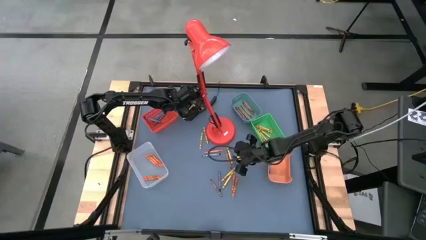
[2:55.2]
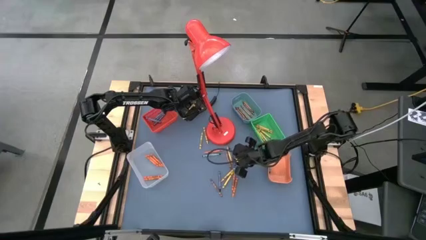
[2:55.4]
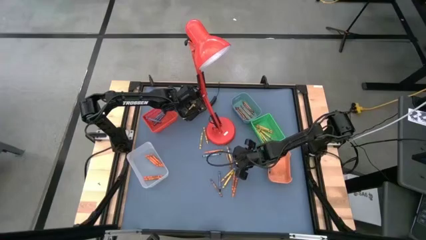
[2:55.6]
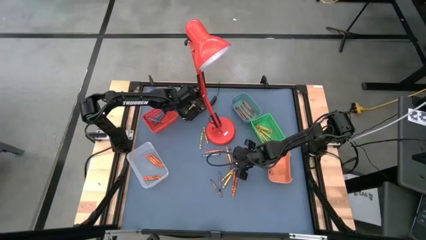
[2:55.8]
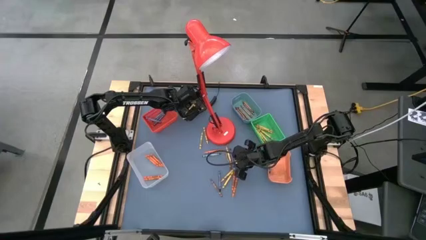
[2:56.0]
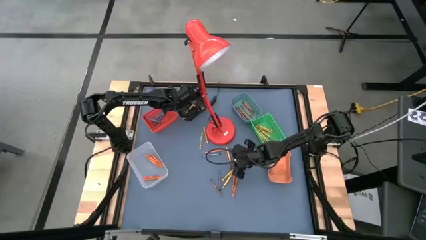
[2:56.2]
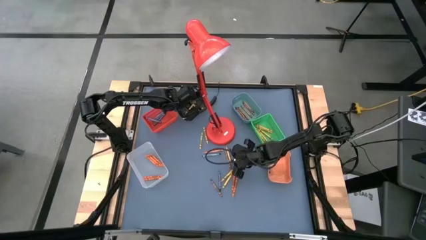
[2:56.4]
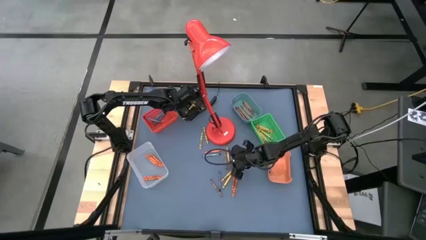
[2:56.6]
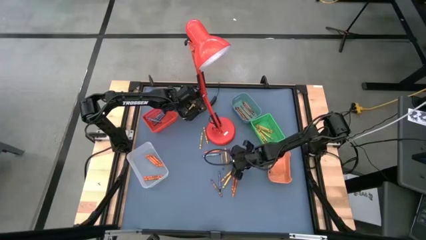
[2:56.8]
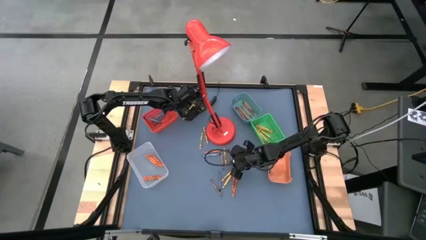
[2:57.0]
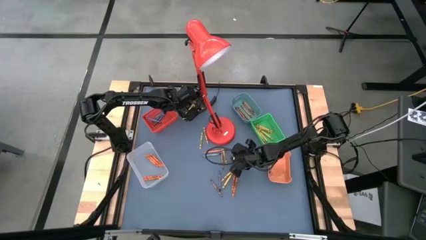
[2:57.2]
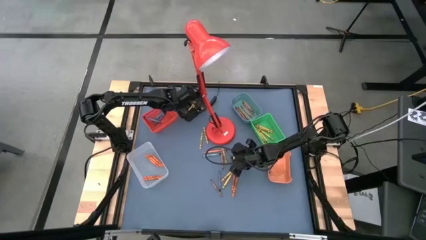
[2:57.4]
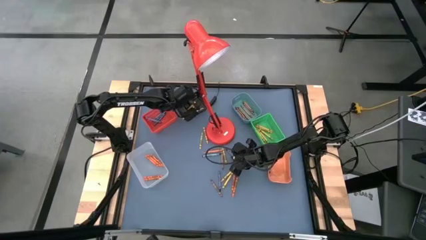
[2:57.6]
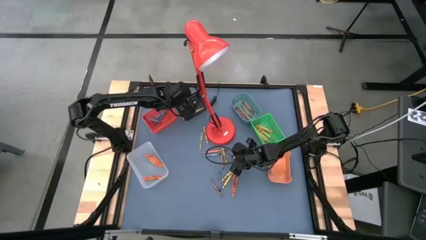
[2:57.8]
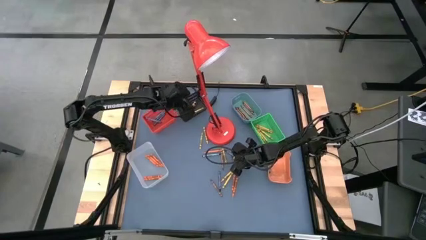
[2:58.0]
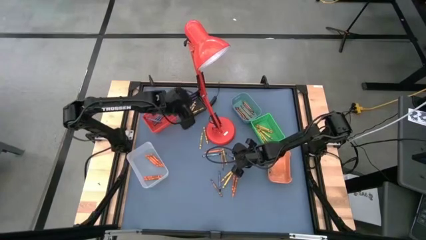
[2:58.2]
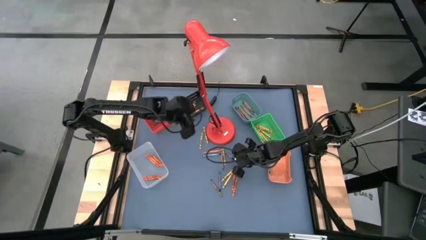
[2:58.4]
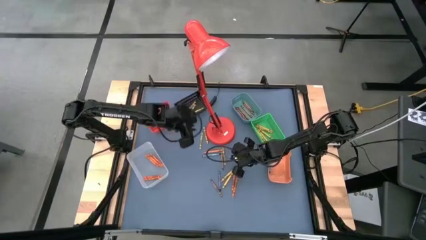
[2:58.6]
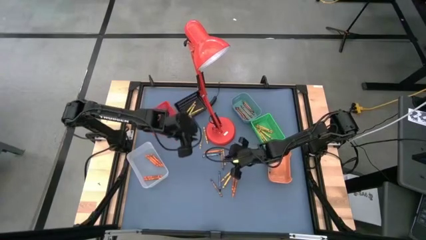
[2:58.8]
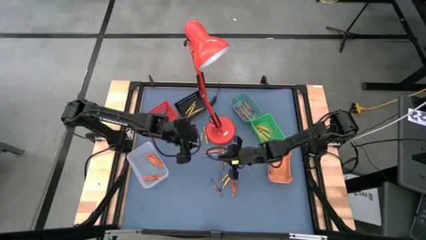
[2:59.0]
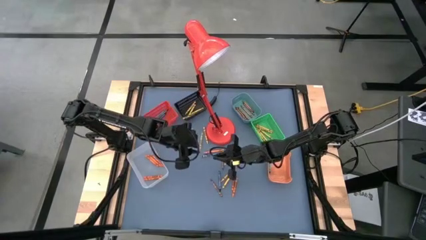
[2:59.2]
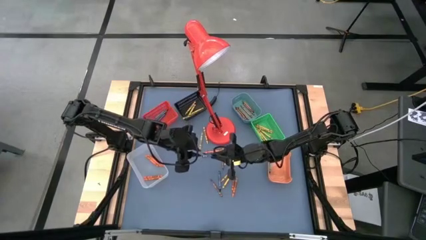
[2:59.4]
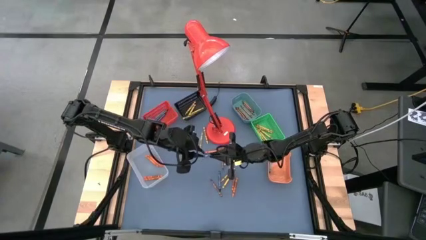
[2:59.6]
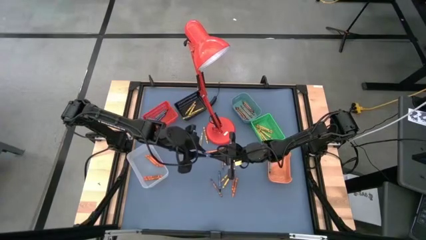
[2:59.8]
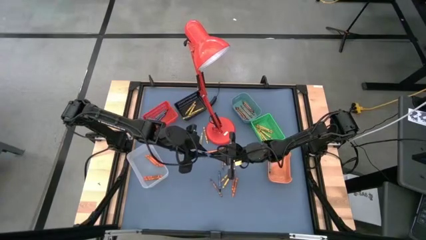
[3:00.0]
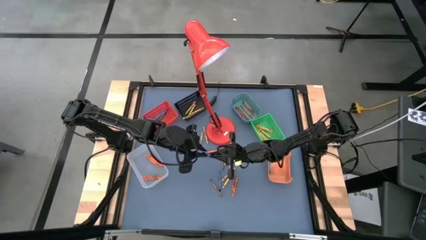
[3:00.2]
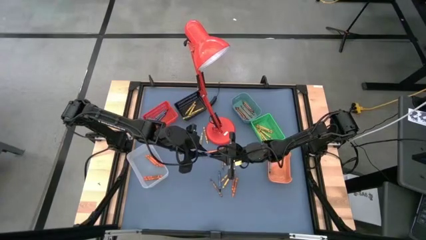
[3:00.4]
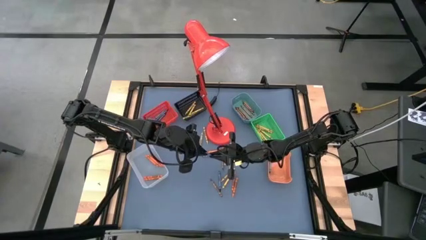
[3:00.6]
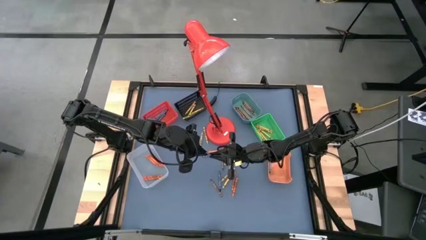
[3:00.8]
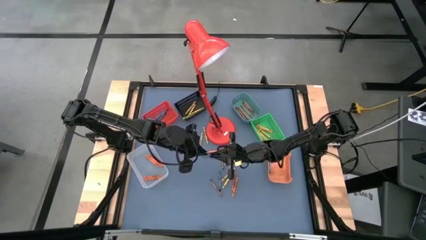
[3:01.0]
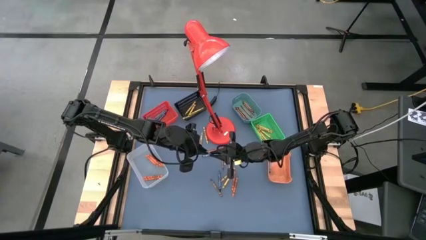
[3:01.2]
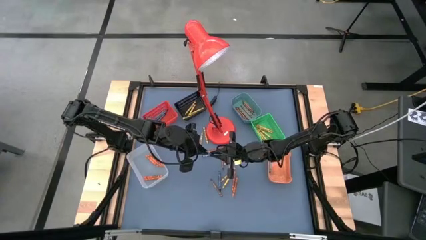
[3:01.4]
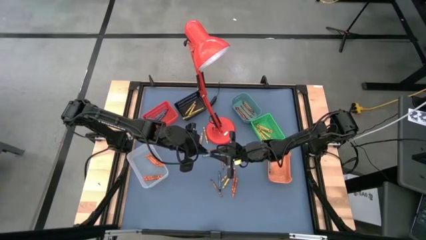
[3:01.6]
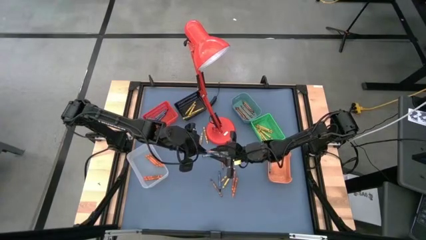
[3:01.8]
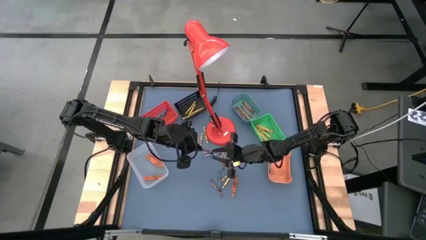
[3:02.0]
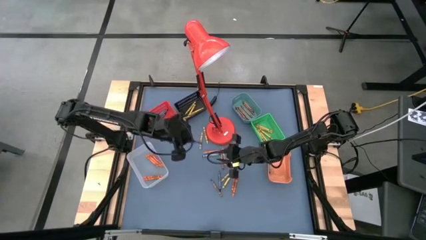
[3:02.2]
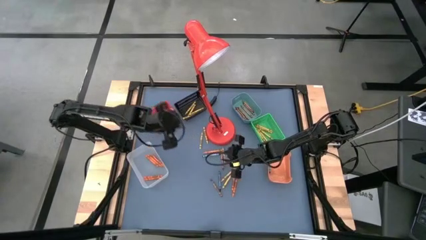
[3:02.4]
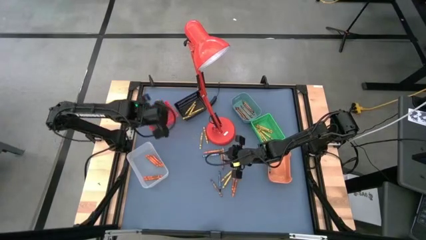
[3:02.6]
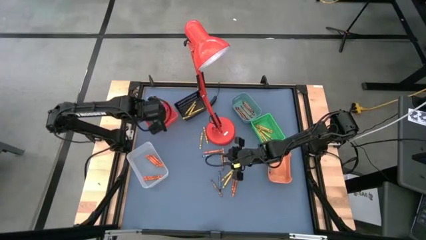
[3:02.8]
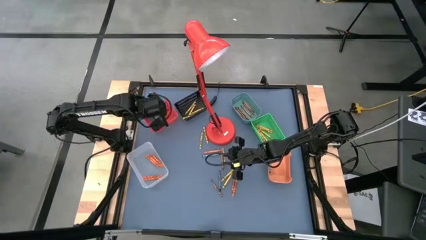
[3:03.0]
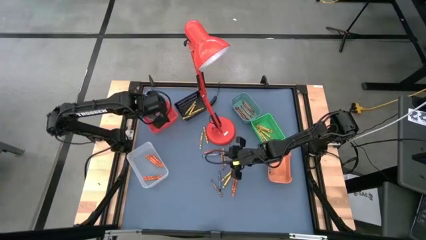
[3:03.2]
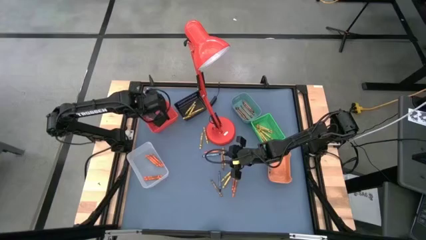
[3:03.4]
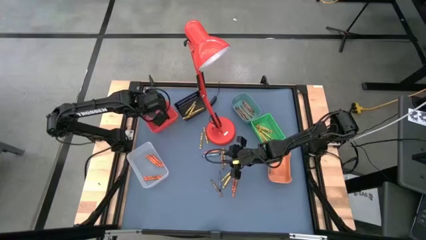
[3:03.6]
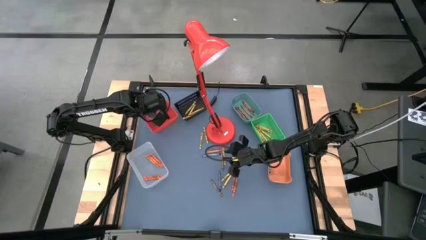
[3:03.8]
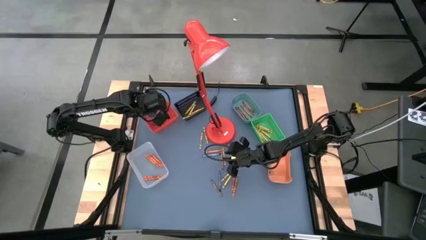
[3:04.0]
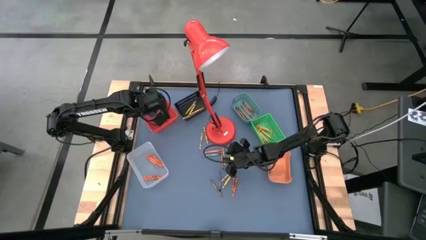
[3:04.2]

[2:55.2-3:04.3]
Task: Sort crayons
Put the blue crayon into the middle left red bin

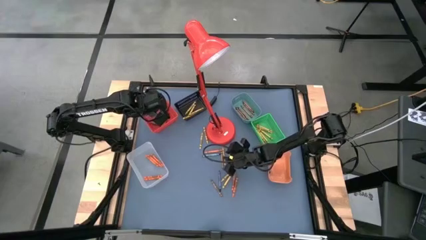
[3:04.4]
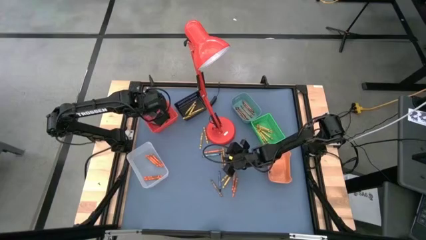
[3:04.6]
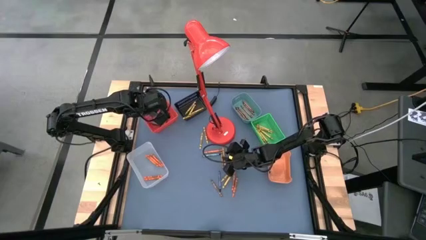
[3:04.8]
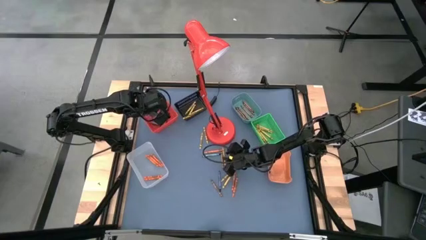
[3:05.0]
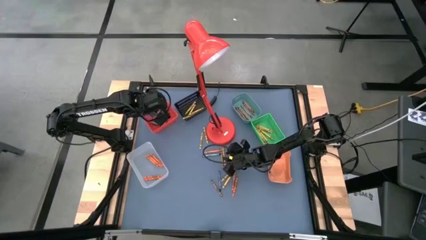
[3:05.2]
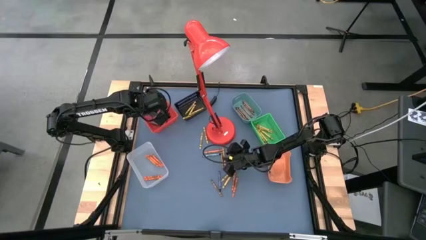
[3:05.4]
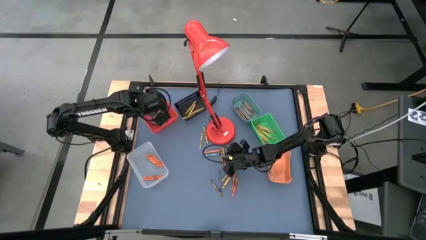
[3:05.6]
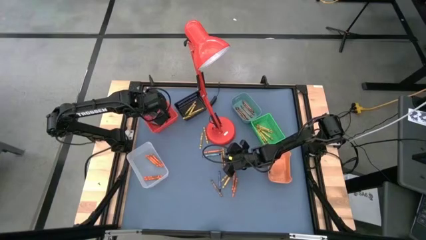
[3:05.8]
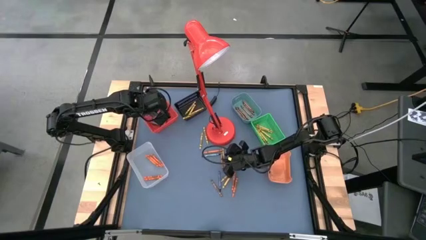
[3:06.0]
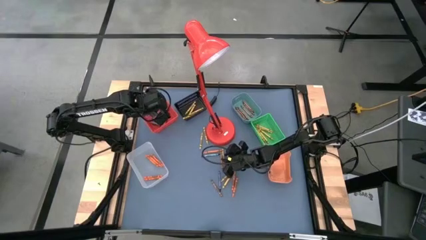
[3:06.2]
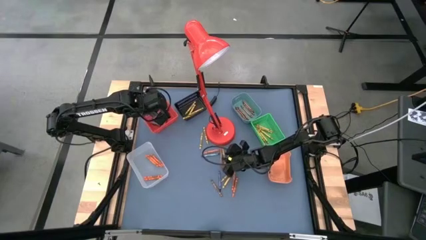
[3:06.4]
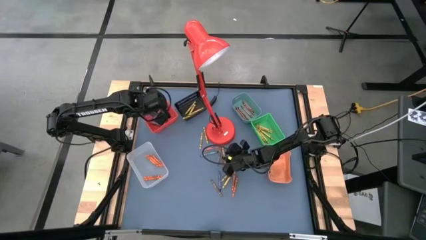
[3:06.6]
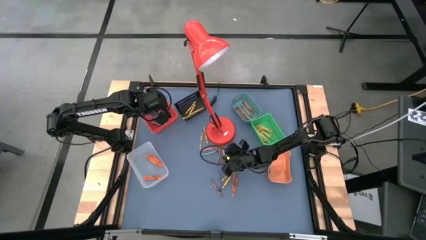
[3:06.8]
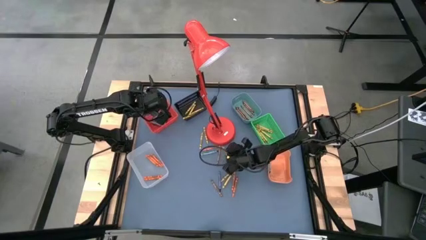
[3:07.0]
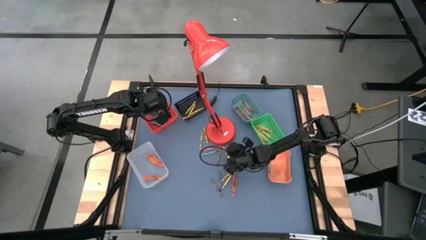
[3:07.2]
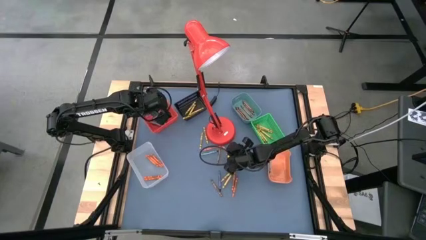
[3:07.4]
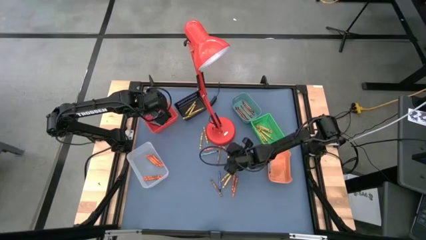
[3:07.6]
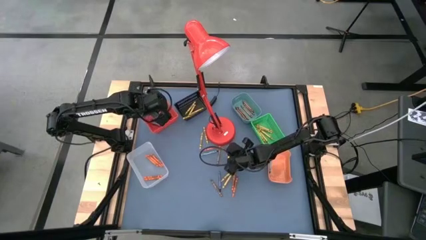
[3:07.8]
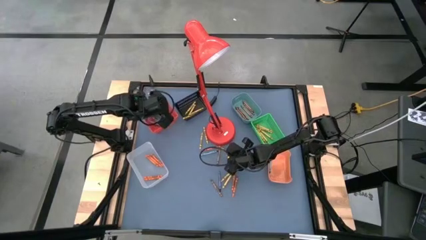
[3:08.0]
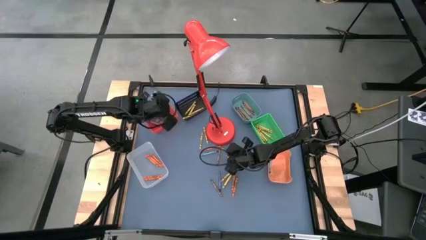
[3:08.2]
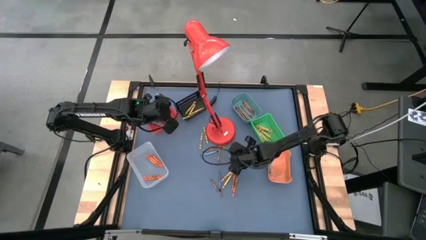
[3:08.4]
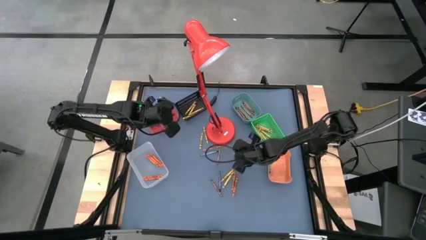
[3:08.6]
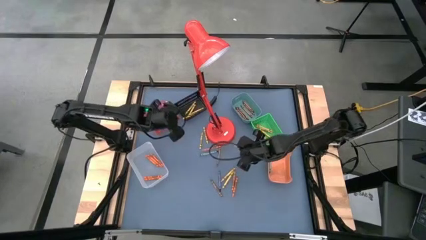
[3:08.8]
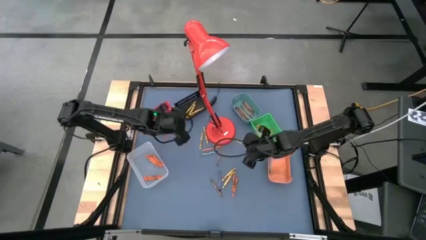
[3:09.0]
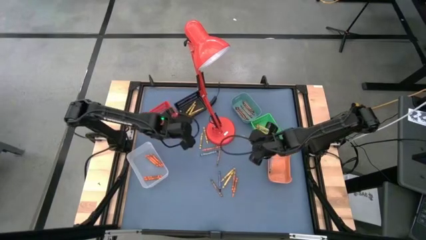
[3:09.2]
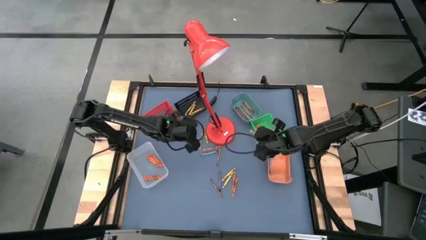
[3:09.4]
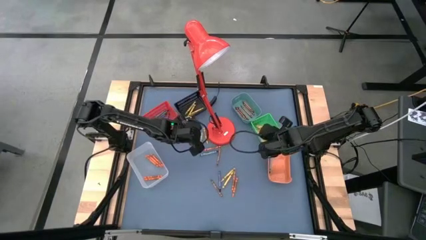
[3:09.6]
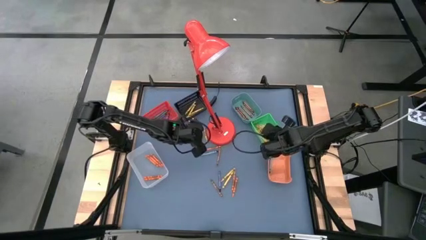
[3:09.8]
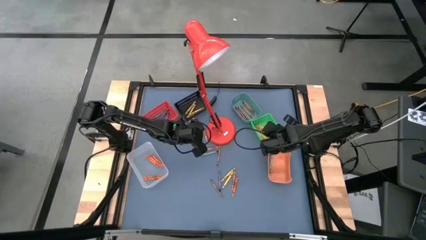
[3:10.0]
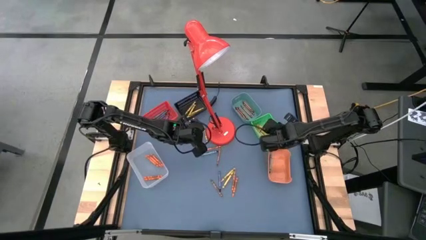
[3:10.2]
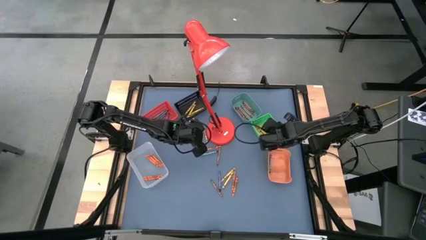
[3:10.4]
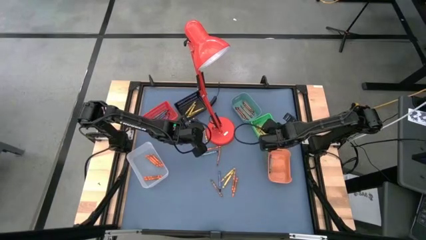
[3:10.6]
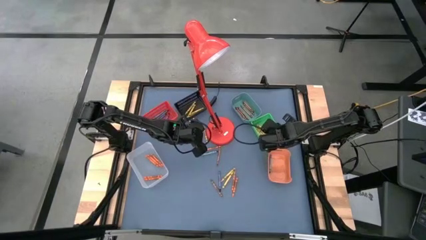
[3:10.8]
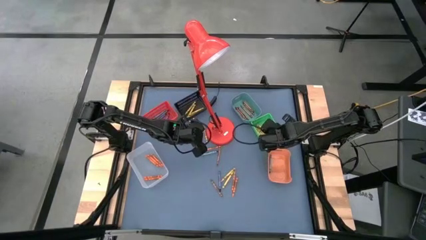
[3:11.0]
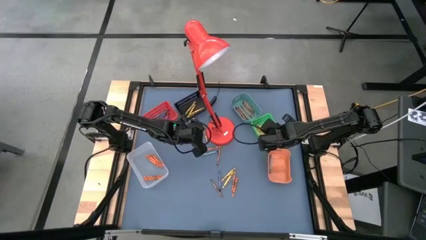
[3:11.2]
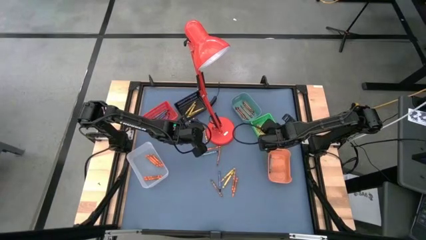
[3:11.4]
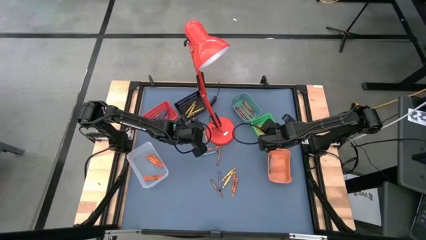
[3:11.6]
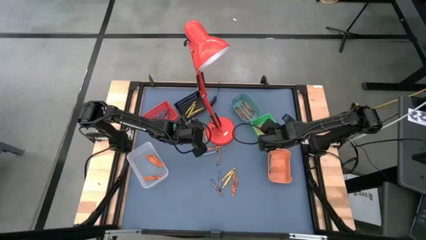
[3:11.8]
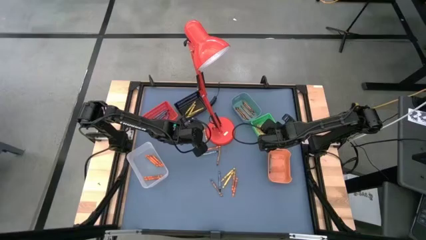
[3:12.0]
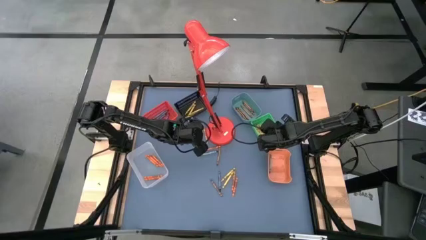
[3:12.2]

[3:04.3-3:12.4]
Put the yellow crayon into the middle right green bin
